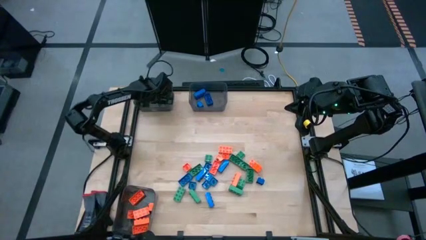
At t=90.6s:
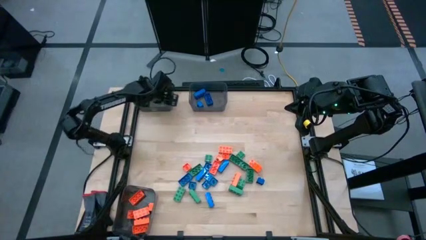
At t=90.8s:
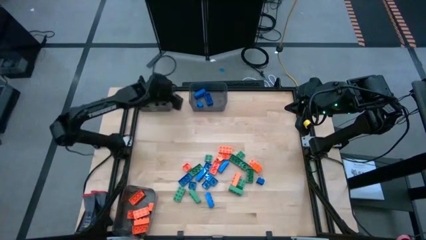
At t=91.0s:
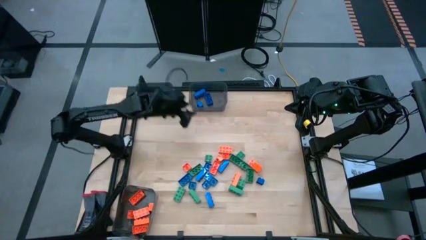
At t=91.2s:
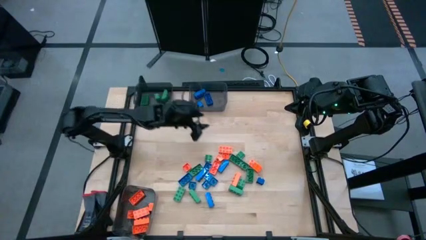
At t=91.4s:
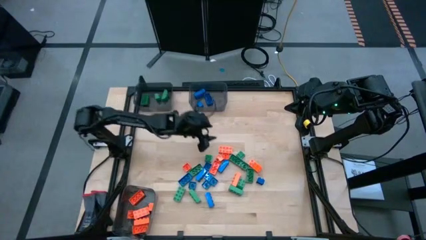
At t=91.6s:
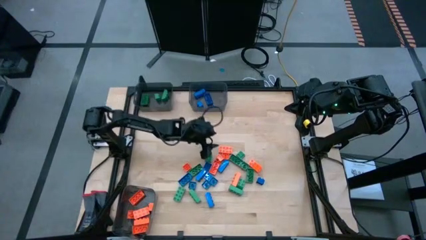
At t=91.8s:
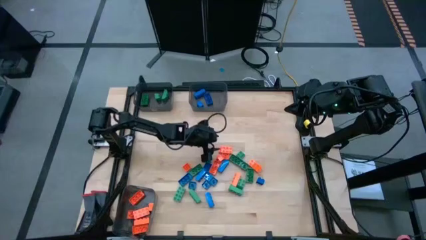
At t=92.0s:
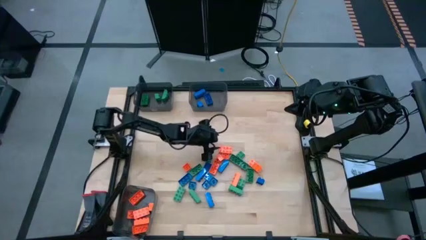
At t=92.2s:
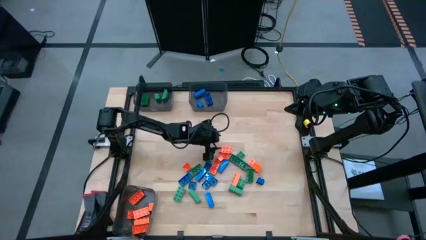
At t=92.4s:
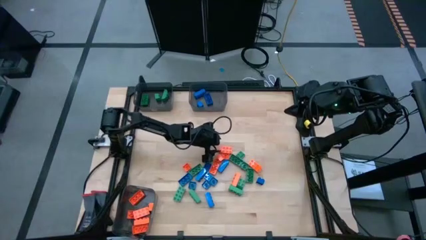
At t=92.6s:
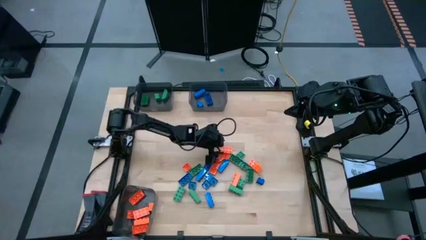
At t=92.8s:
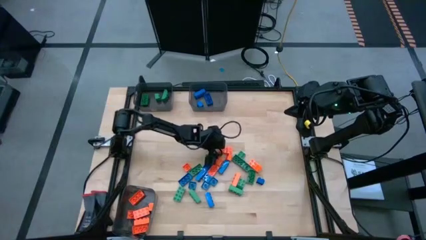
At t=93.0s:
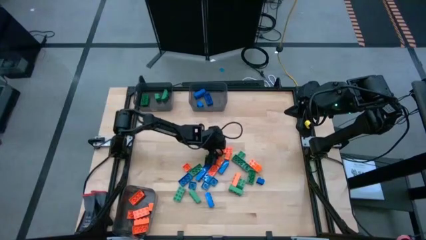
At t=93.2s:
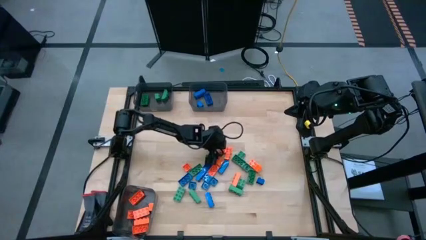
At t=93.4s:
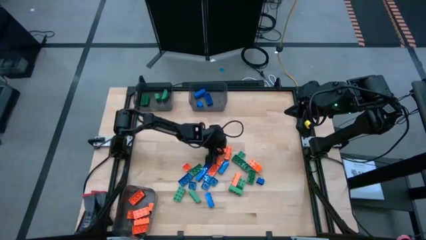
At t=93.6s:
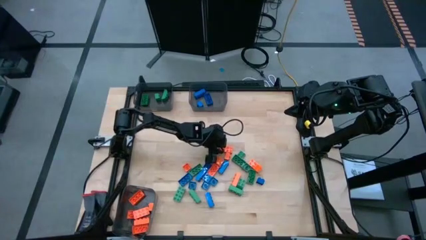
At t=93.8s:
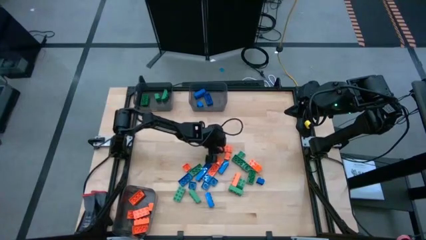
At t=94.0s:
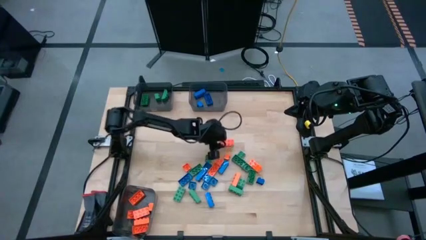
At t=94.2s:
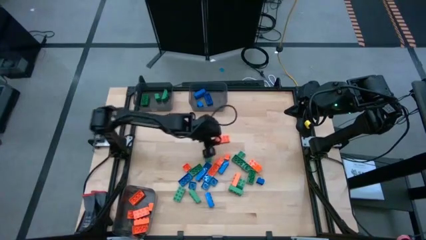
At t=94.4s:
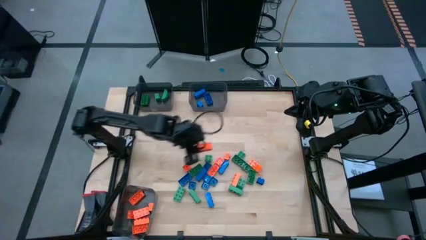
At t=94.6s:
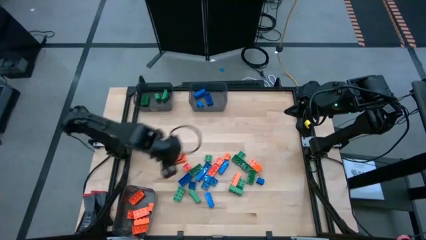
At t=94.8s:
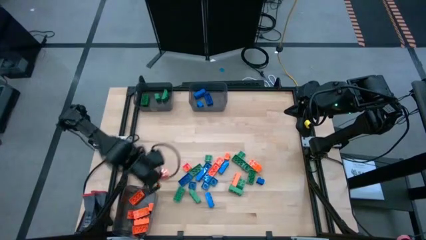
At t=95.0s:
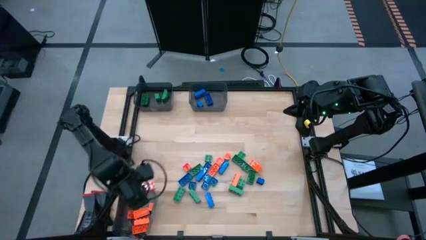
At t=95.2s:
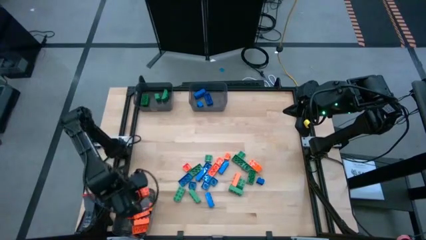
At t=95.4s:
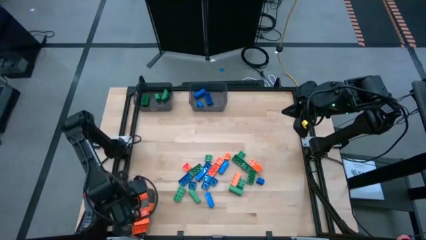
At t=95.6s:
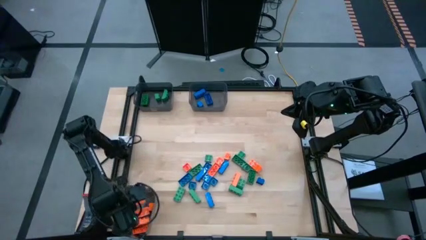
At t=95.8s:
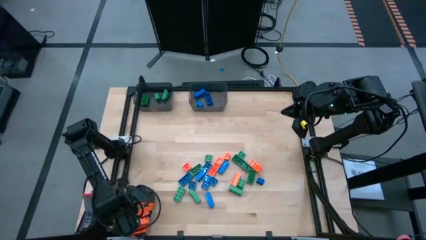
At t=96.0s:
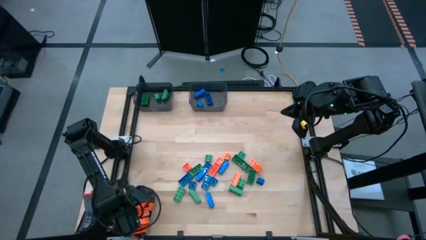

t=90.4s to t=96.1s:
Task: Sort blocks
Put the orange gamepiece into the bottom black bin

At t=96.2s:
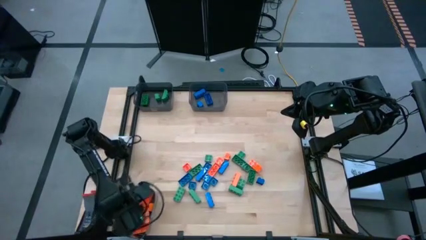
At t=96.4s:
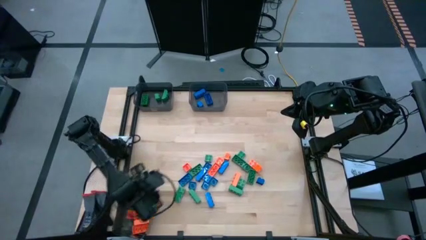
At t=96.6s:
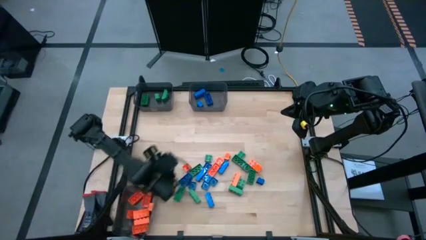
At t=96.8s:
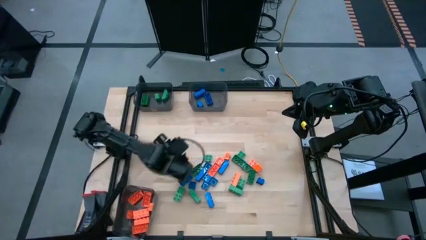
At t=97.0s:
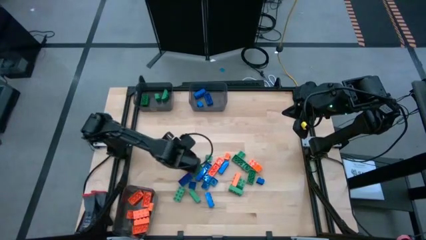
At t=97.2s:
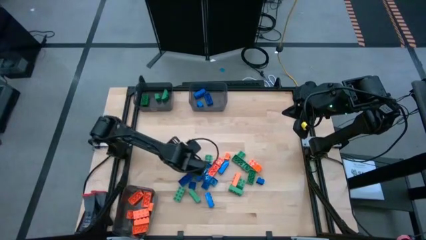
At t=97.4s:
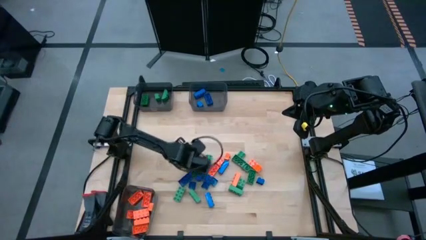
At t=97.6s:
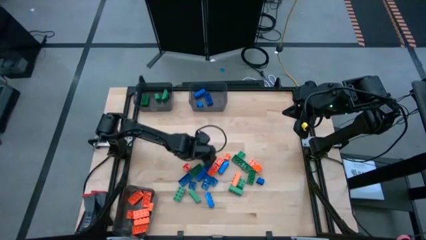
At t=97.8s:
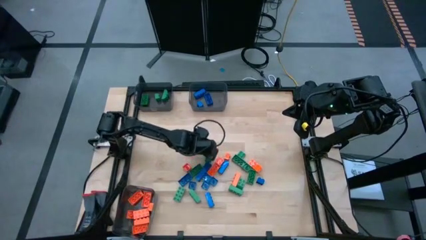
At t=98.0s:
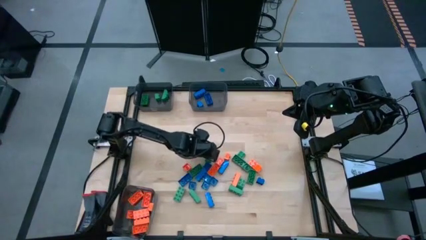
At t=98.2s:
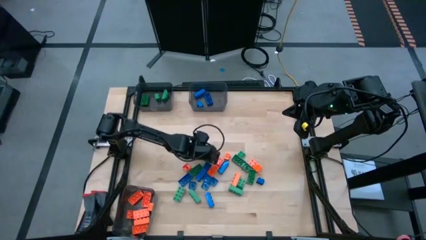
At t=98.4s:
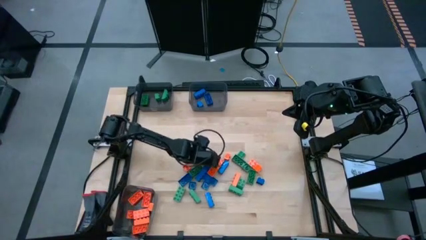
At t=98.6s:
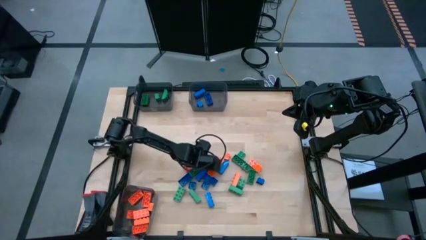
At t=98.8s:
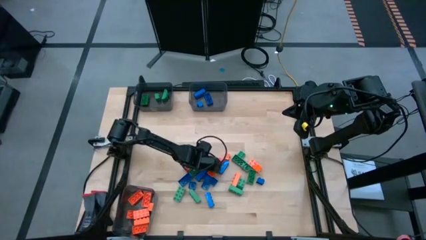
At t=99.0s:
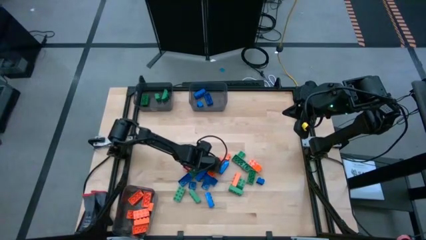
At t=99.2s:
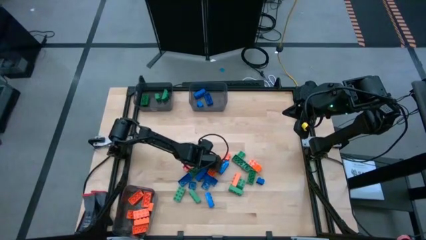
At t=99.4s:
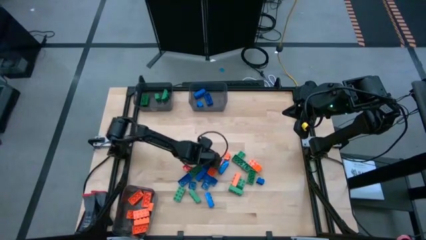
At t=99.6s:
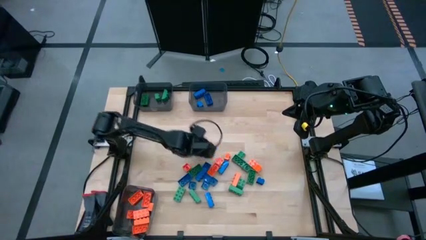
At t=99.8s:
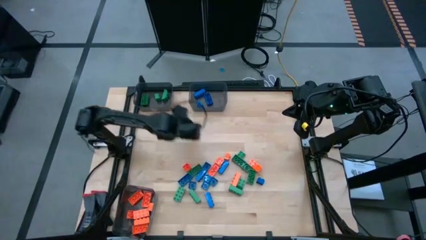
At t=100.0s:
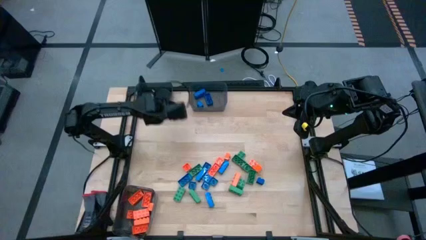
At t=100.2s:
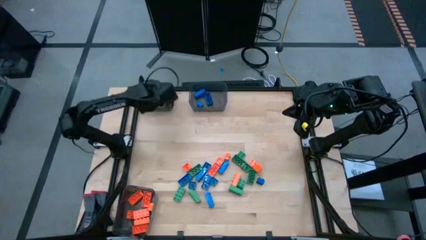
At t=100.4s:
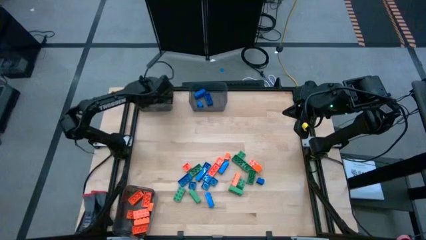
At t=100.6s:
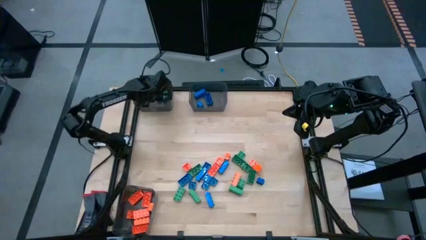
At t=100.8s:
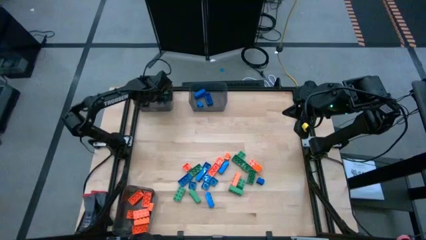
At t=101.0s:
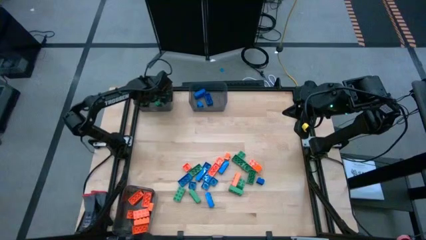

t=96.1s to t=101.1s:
Put the green gamepiece into the top left black bin

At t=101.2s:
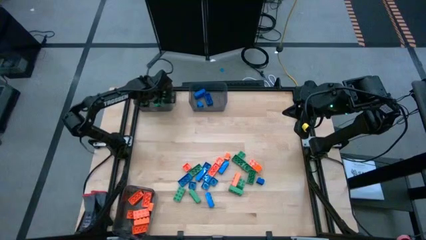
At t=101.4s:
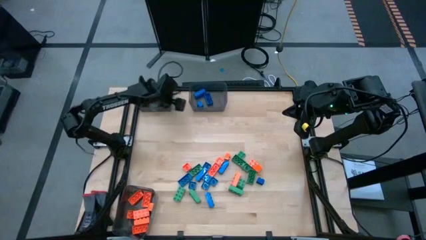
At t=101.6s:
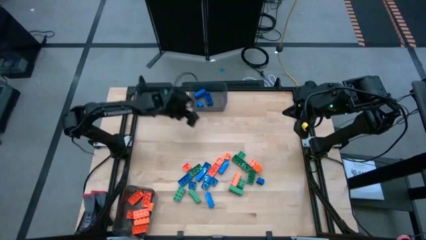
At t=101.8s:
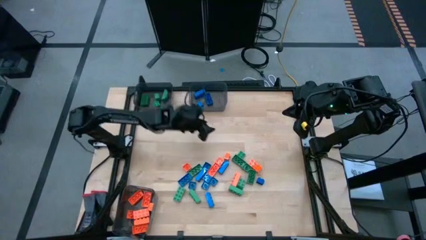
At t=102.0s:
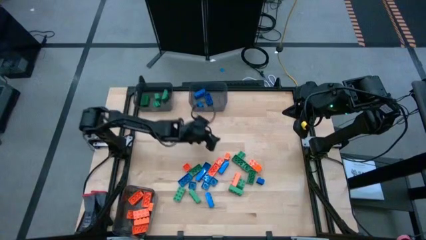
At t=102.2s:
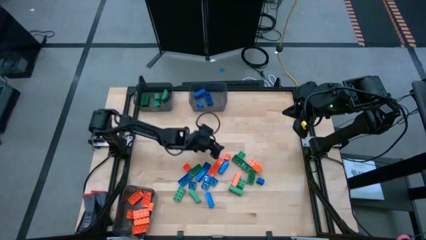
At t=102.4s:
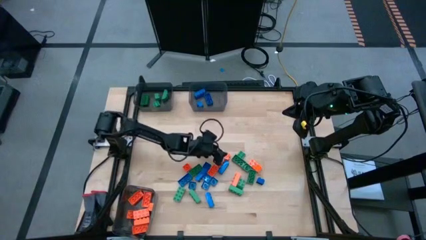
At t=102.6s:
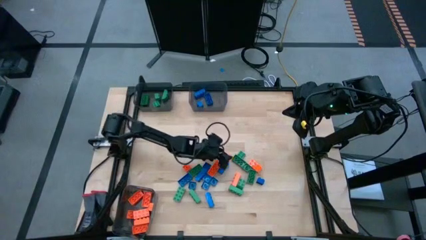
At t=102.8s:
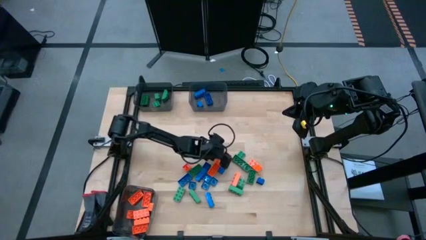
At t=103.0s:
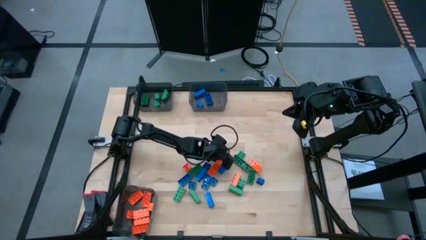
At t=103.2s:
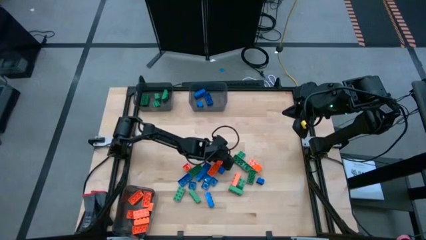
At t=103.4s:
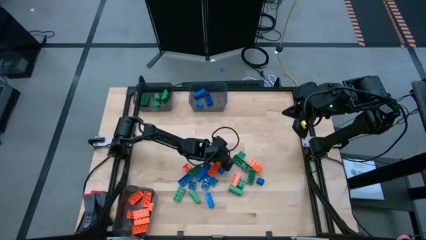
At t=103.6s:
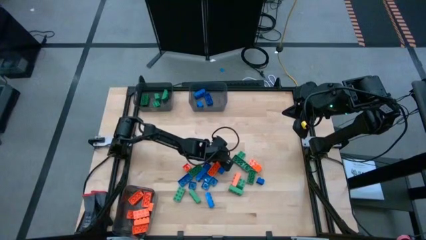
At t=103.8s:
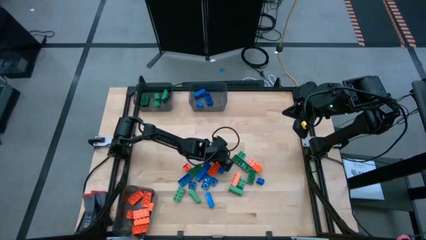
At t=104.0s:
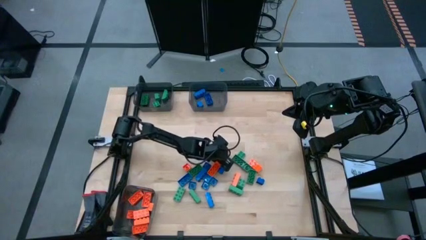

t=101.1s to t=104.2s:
Put the orange gamepiece into the bottom left black bin

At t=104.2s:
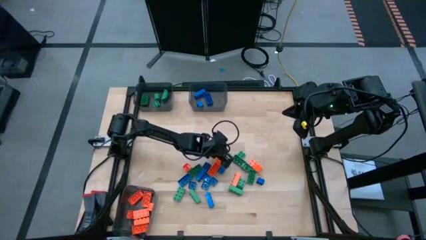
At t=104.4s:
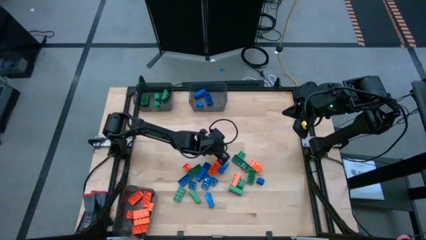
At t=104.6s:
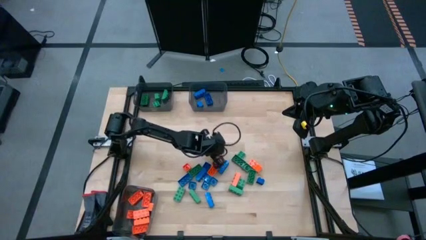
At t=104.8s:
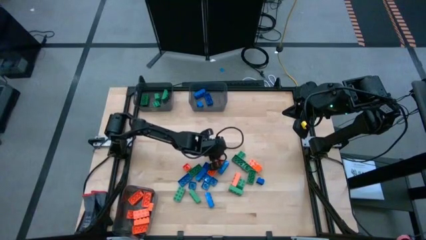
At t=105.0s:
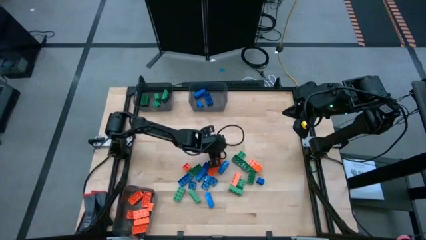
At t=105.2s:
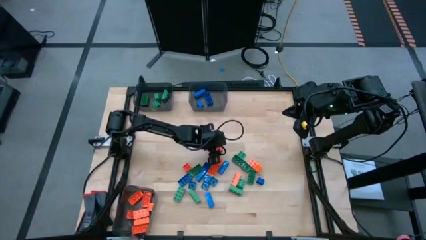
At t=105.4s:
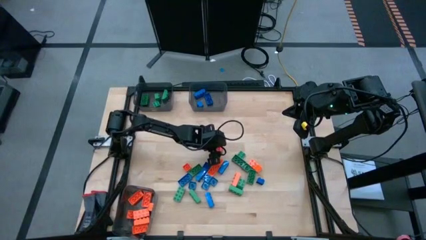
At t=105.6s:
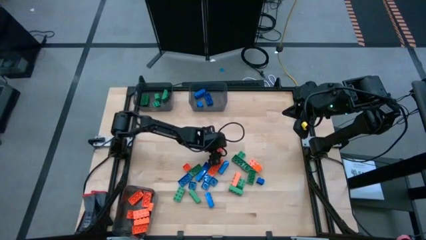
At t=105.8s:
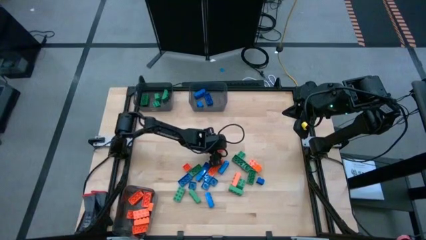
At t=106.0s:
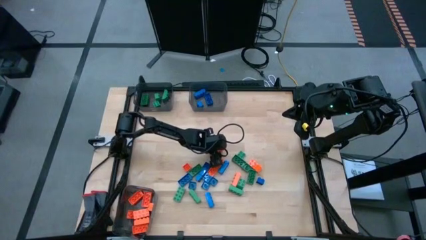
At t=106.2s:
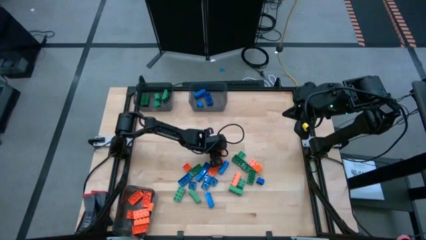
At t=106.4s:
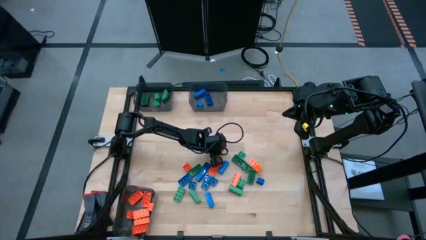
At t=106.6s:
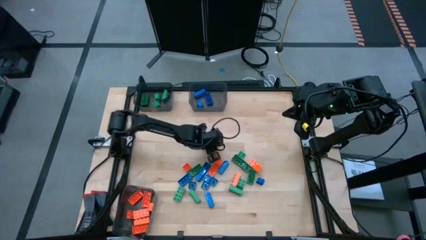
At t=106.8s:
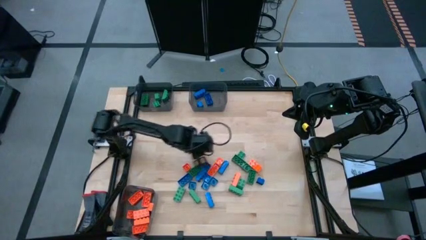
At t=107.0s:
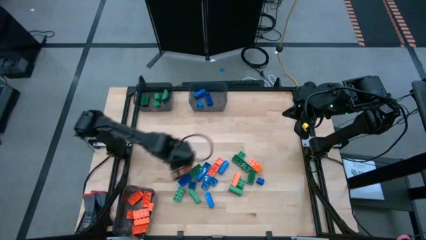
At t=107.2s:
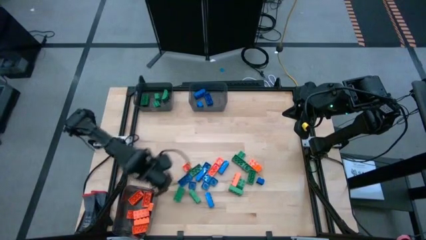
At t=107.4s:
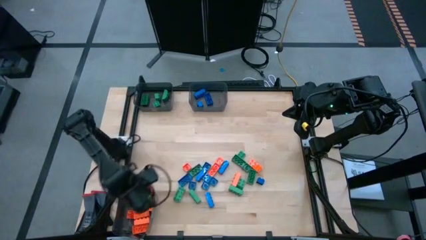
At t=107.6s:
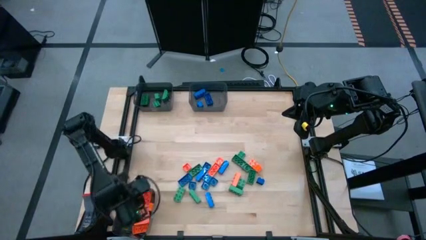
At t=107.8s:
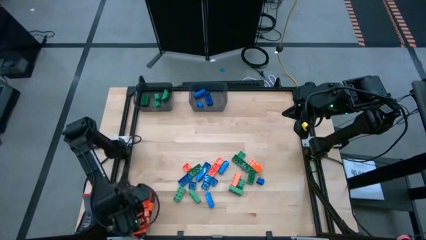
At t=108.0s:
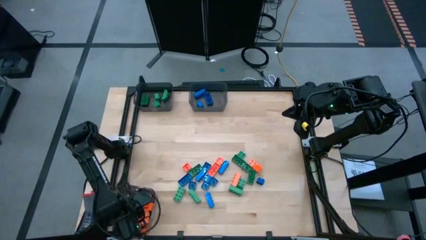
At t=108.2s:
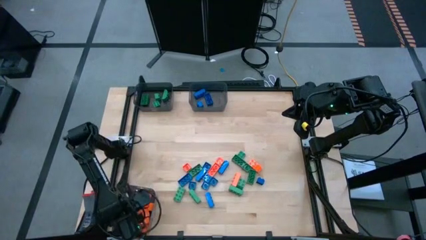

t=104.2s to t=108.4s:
Put the orange gamepiece into the bottom black bin
